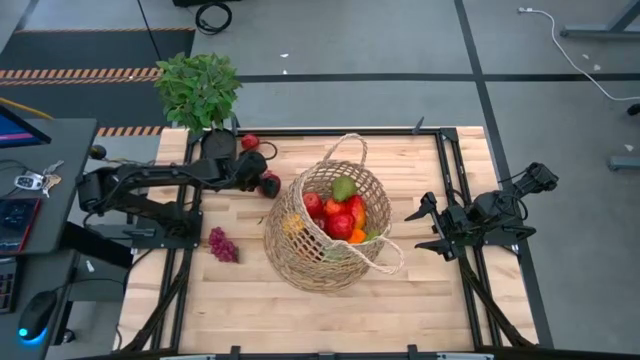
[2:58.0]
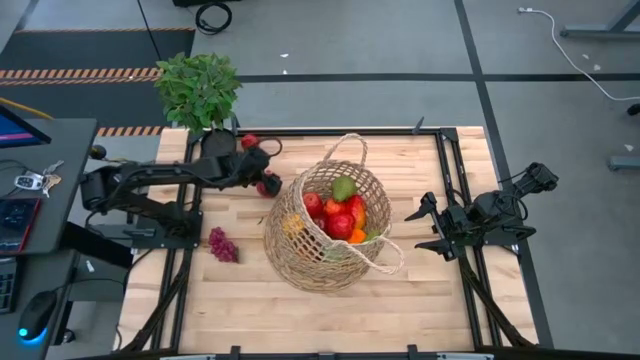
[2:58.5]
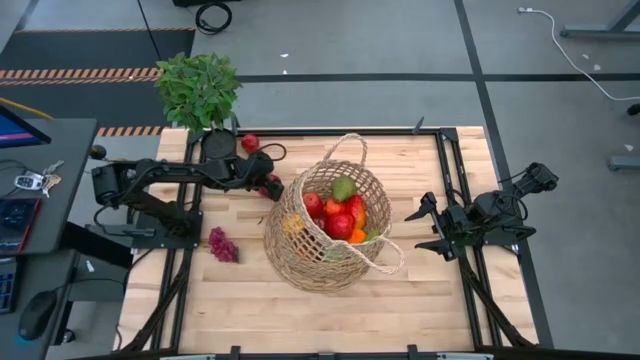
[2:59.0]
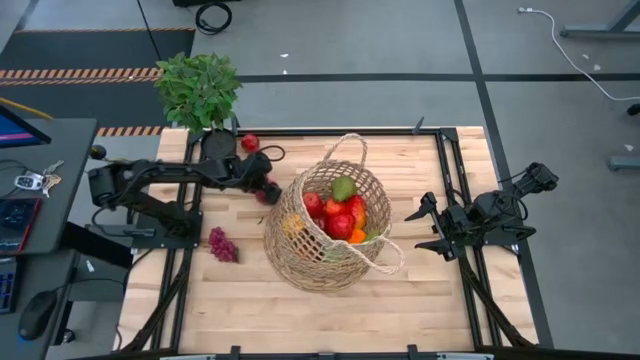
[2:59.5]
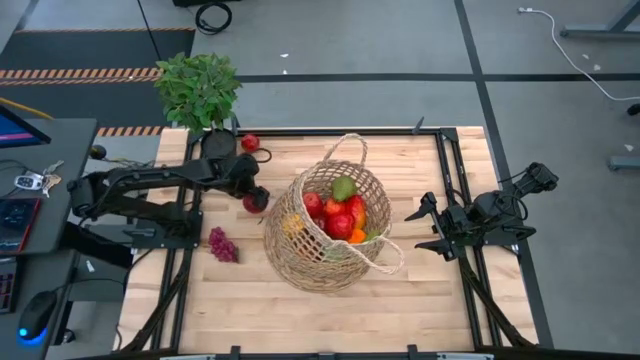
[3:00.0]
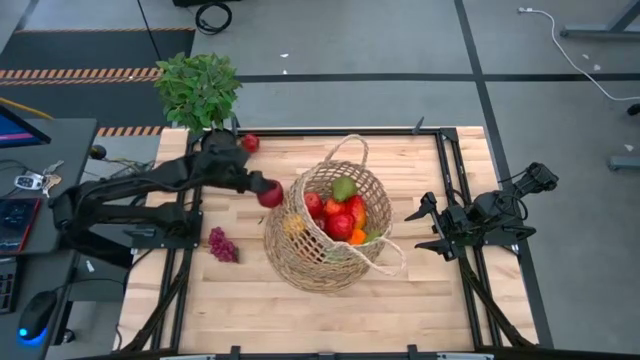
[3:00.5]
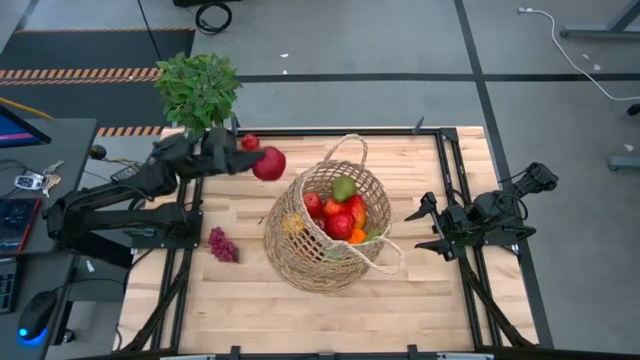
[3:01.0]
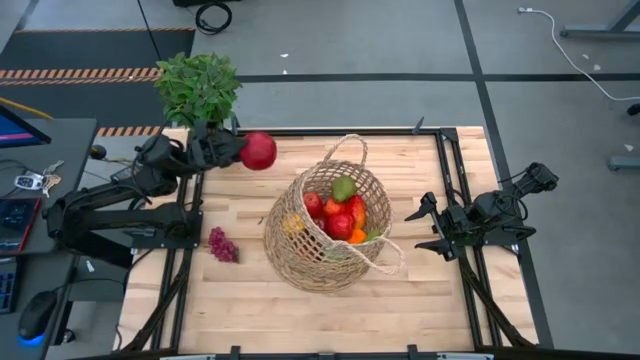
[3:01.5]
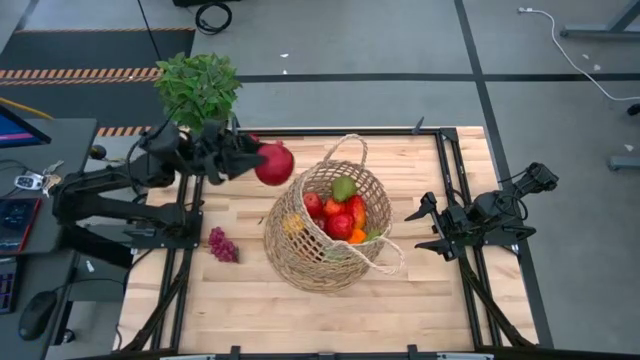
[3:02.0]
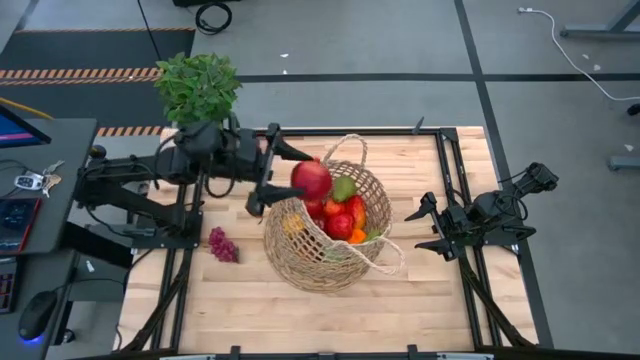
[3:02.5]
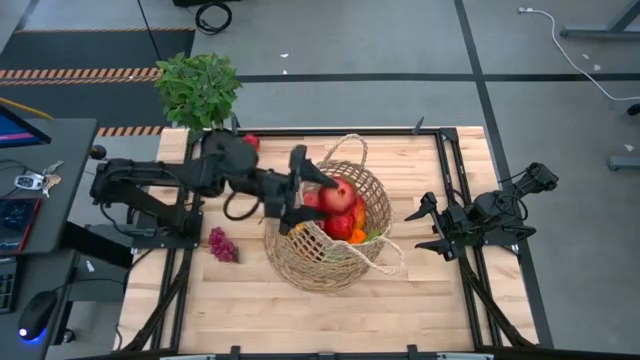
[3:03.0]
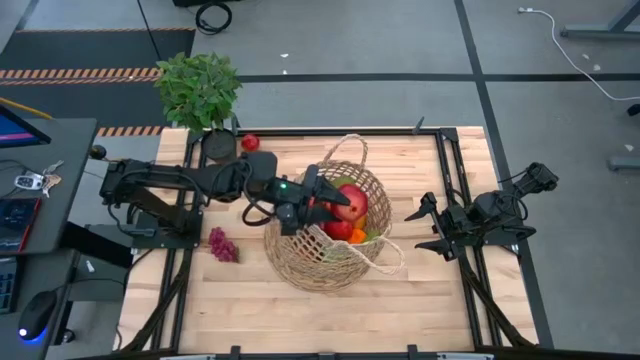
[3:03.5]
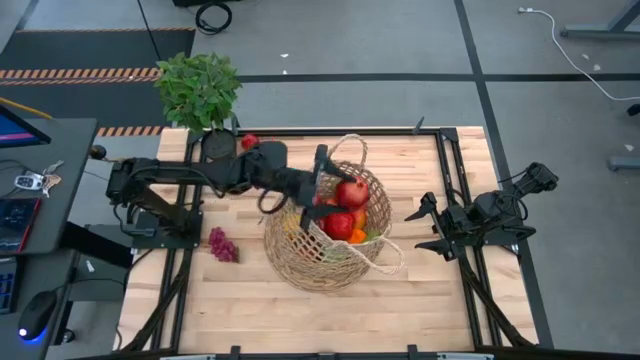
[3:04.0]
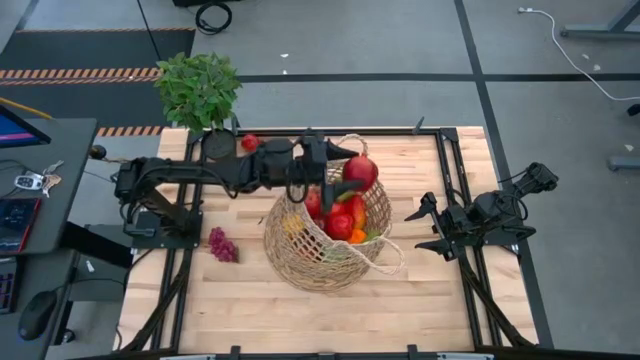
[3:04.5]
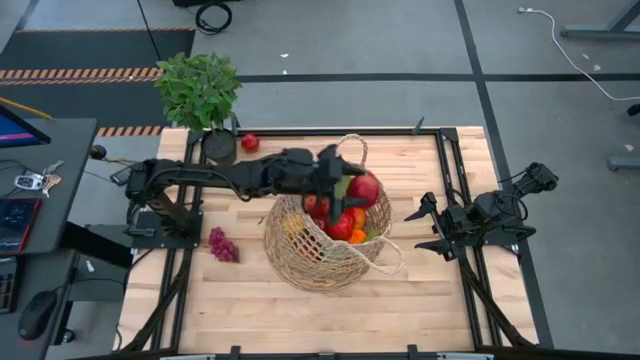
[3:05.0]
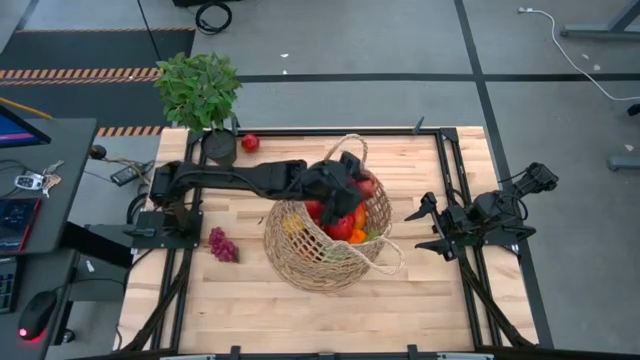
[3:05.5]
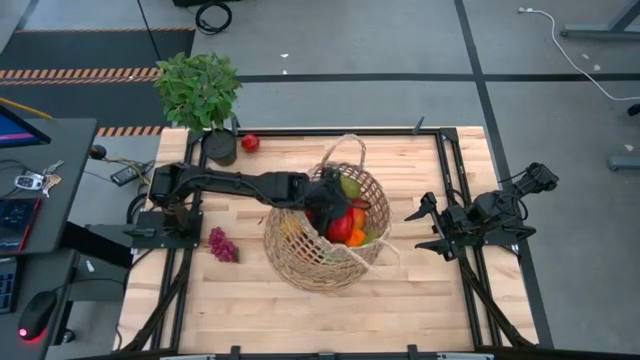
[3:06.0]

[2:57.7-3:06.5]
Task: Build produce basket
Put the red pomegranate into the brown basket

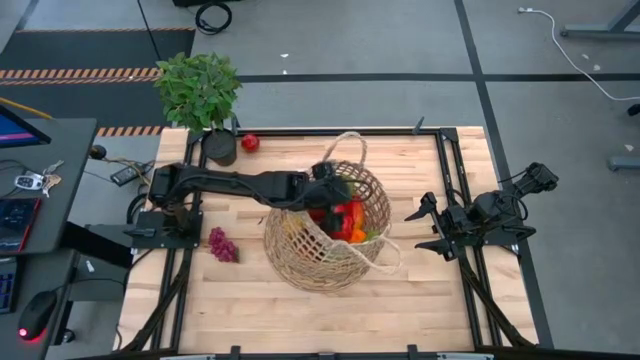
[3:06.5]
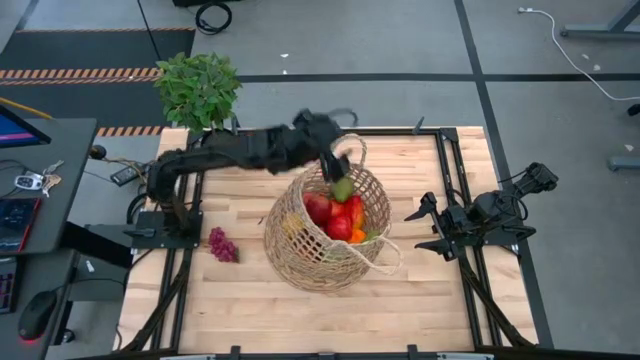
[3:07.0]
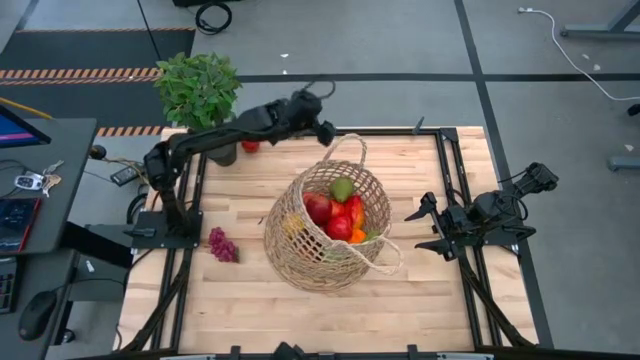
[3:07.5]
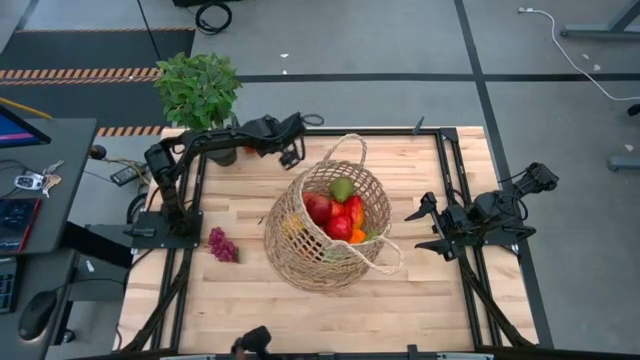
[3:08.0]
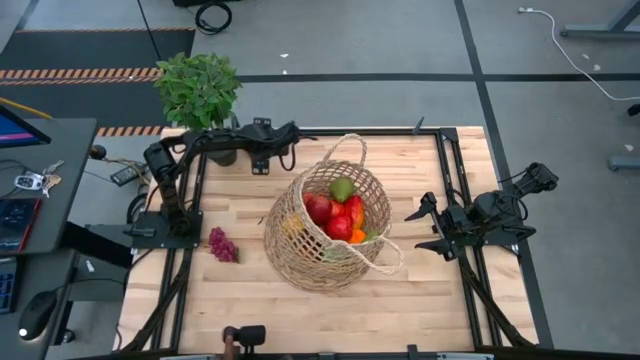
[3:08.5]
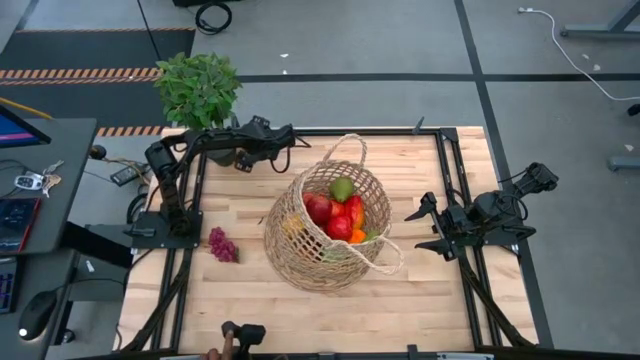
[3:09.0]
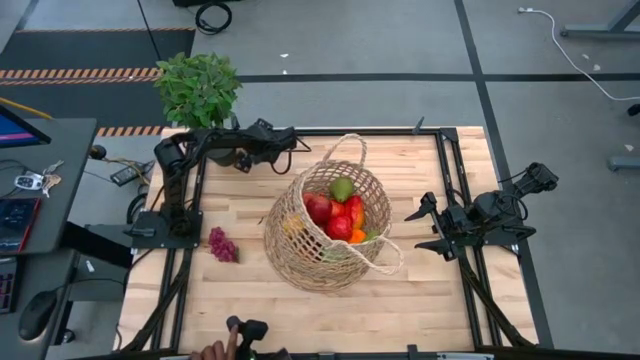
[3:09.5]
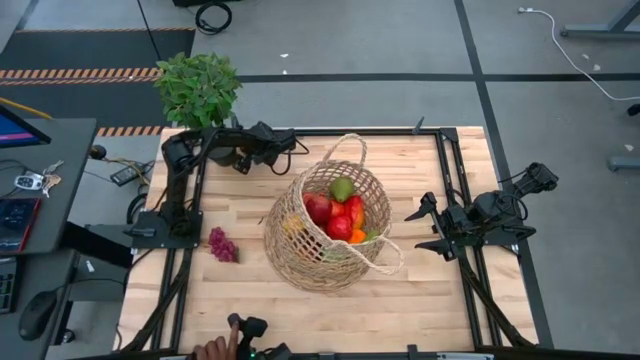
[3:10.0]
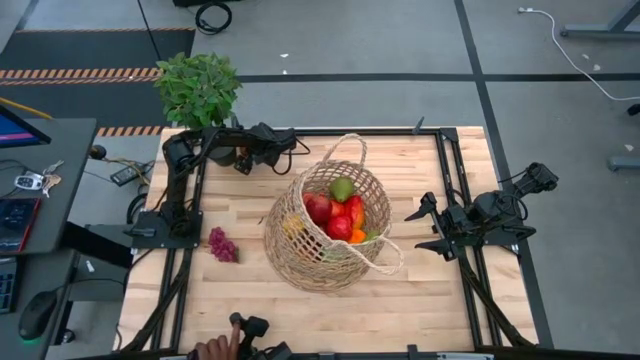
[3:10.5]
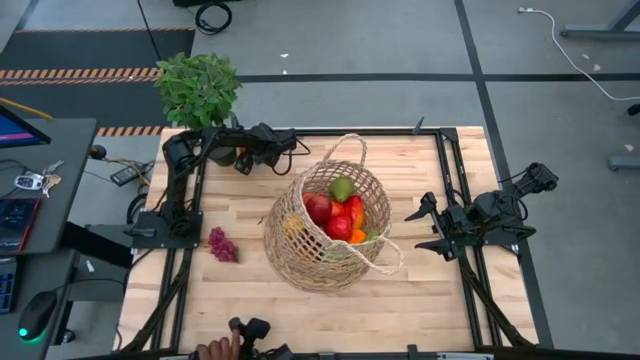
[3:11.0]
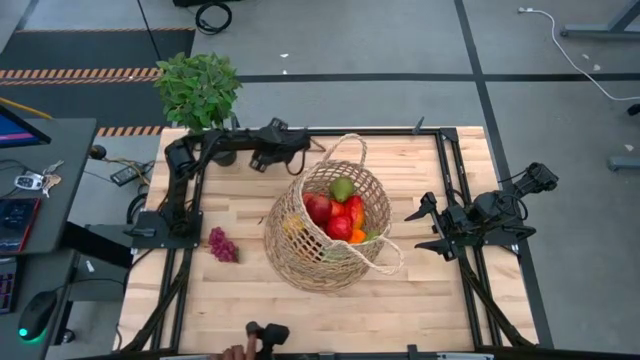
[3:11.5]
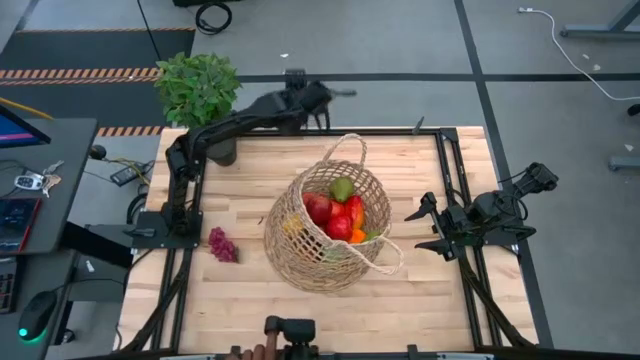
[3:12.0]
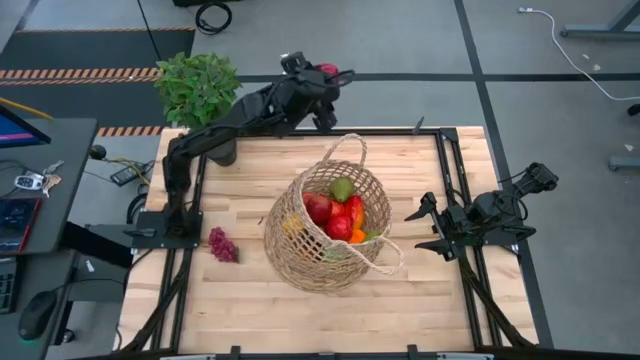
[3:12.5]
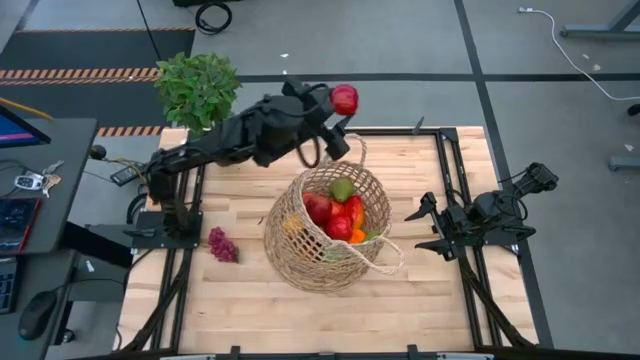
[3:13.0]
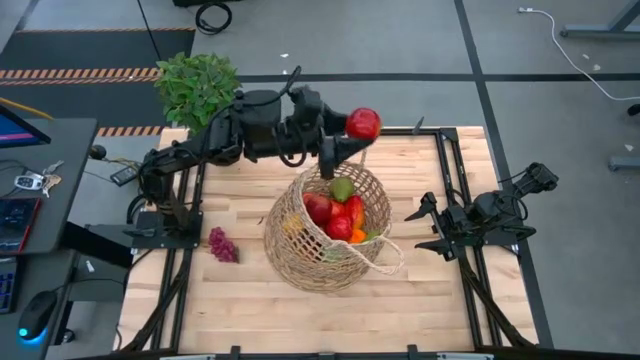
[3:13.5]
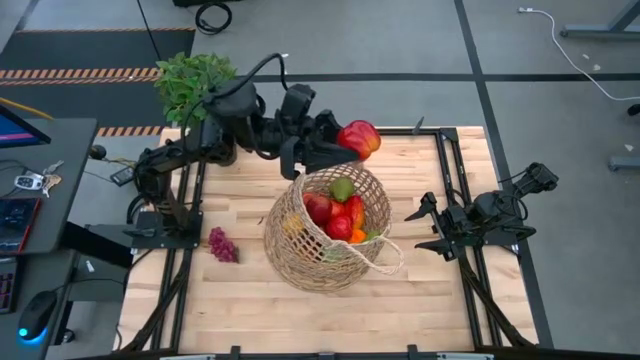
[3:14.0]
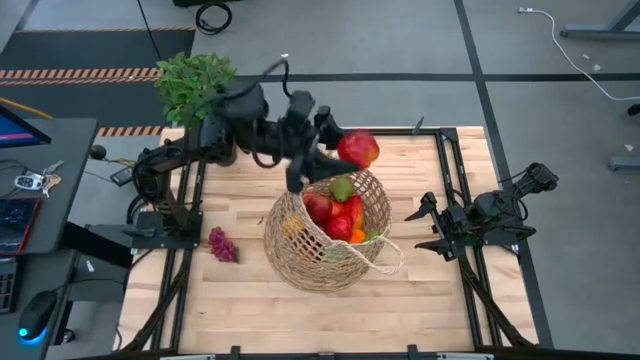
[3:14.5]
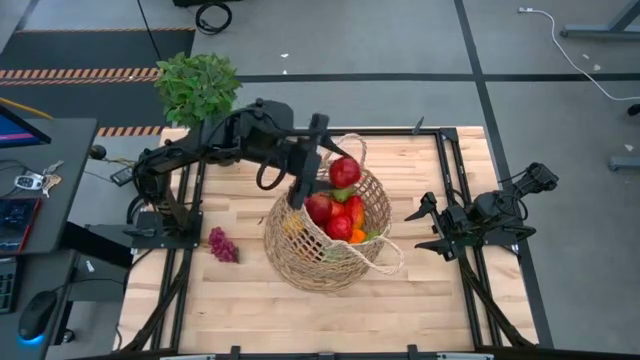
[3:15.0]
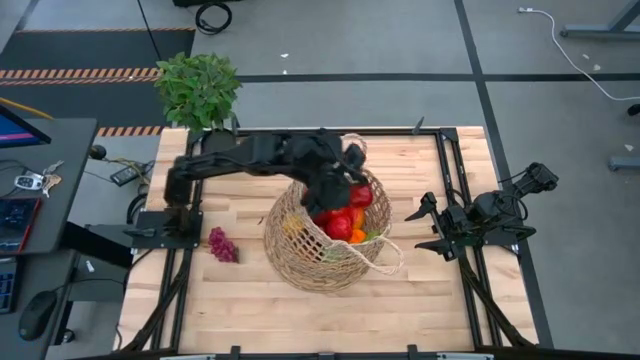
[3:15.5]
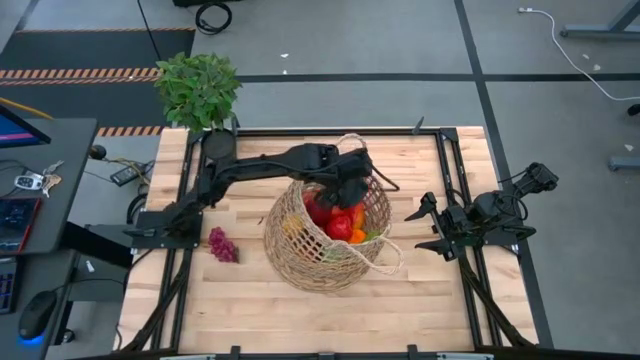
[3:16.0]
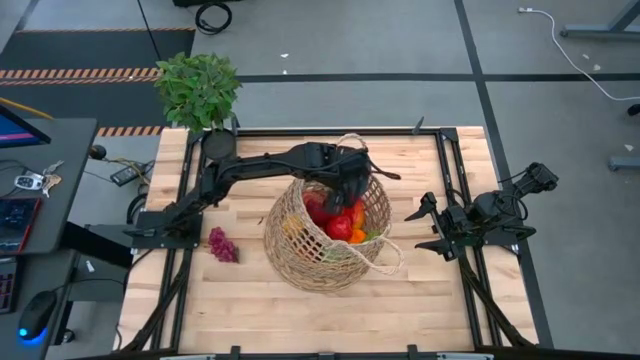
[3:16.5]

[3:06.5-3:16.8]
Put the red pomegranate into the brown basket

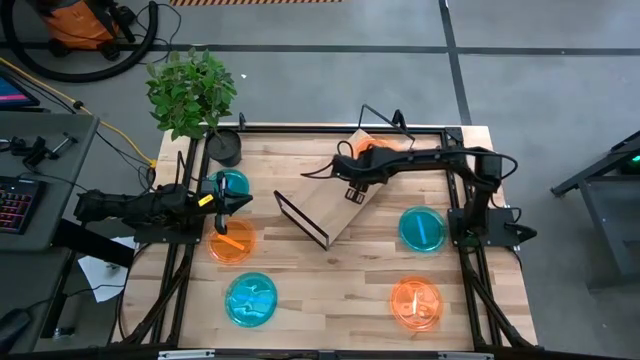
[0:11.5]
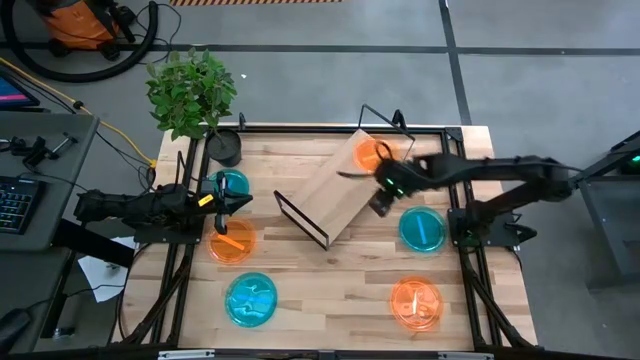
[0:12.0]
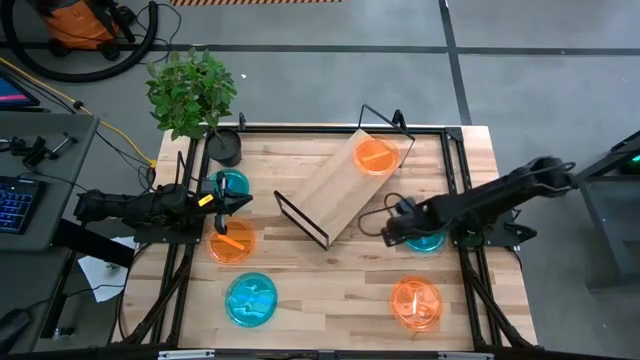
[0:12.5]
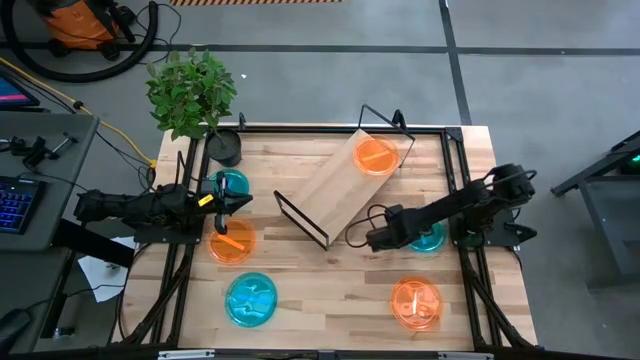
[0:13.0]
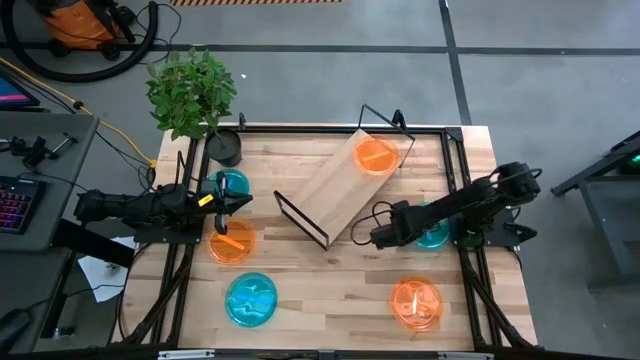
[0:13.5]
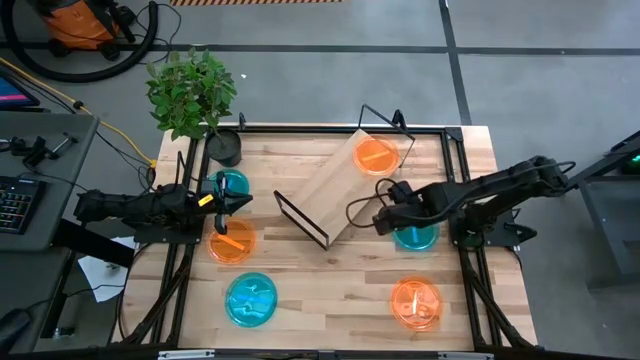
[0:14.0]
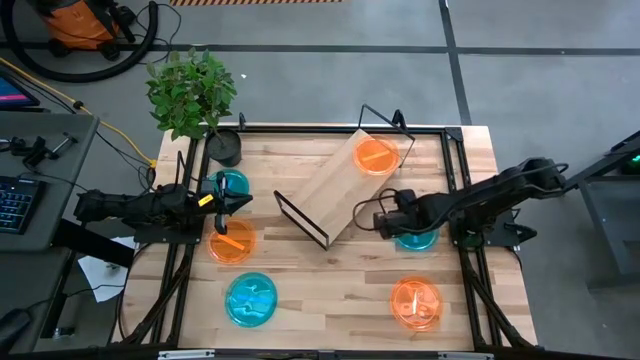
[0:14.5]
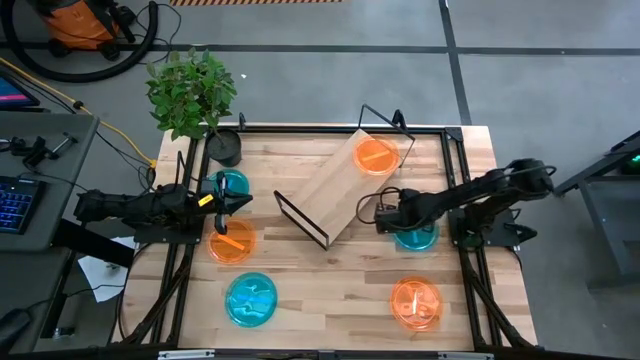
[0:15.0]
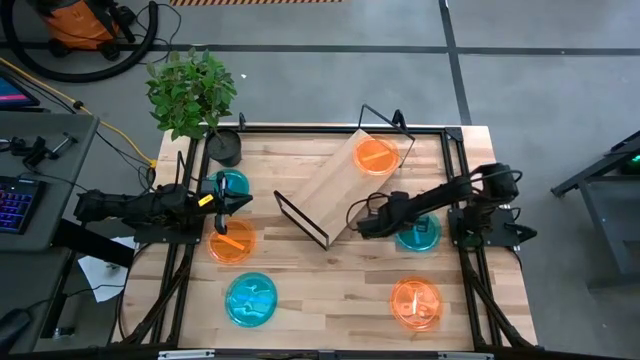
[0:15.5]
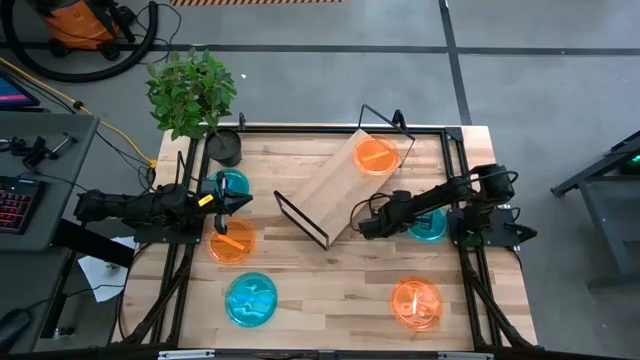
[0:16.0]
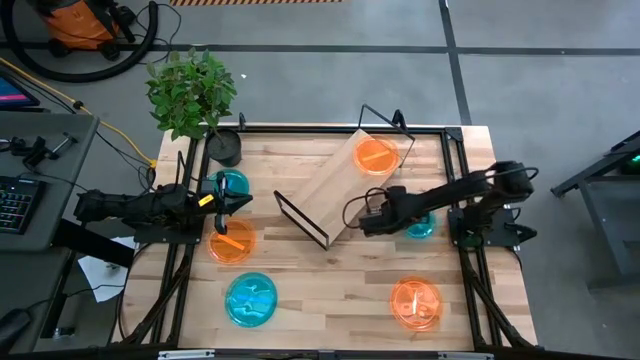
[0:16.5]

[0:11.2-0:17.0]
Task: Place and stack plates onto a shelf
Put the top right blue plate on the shelf
